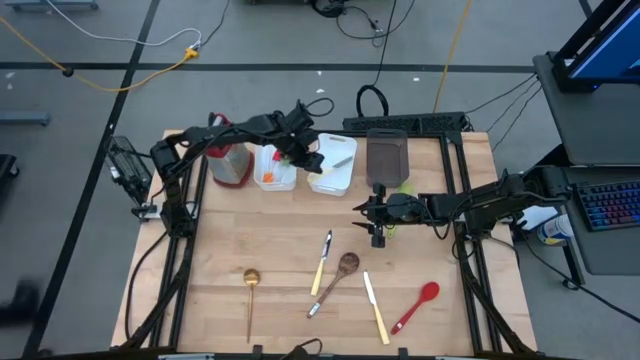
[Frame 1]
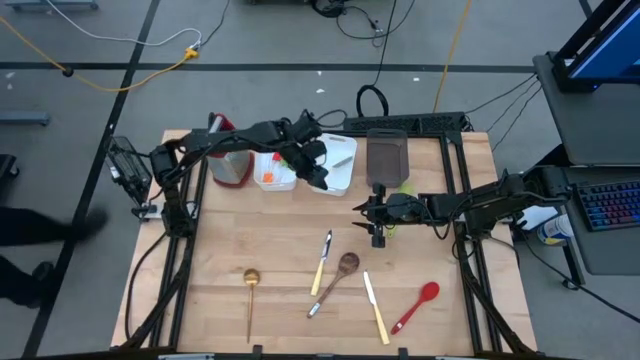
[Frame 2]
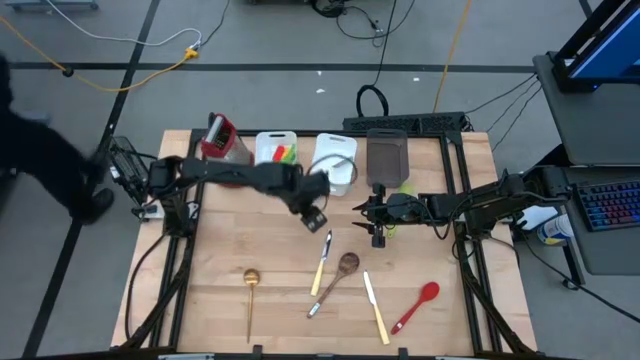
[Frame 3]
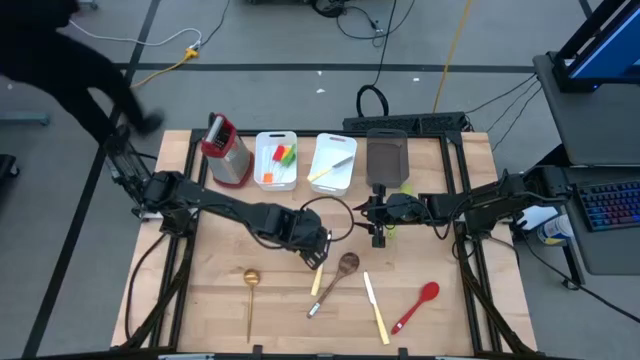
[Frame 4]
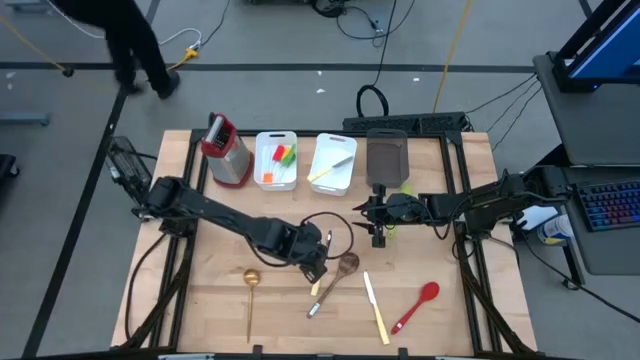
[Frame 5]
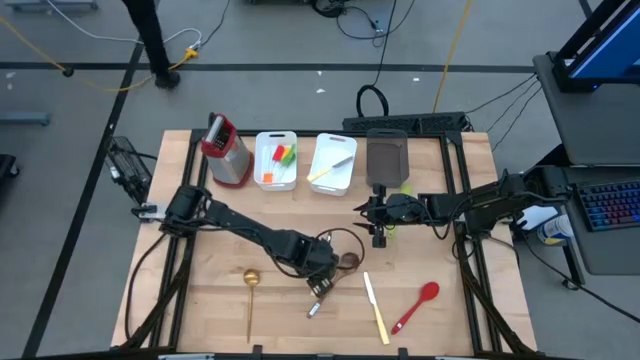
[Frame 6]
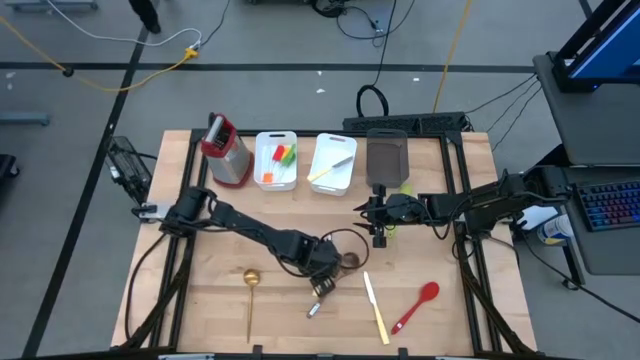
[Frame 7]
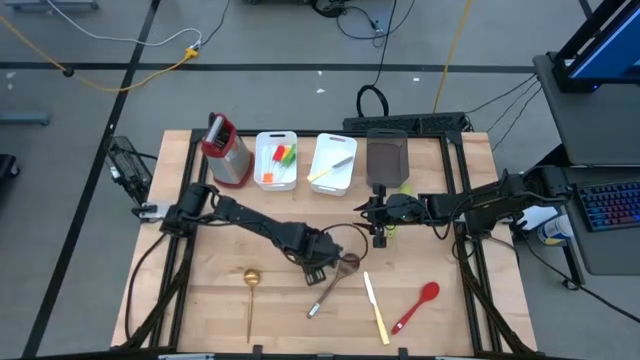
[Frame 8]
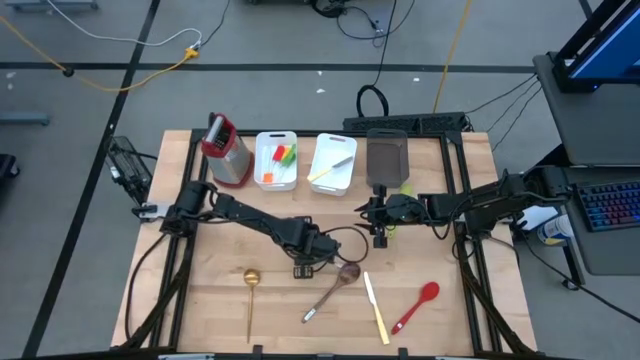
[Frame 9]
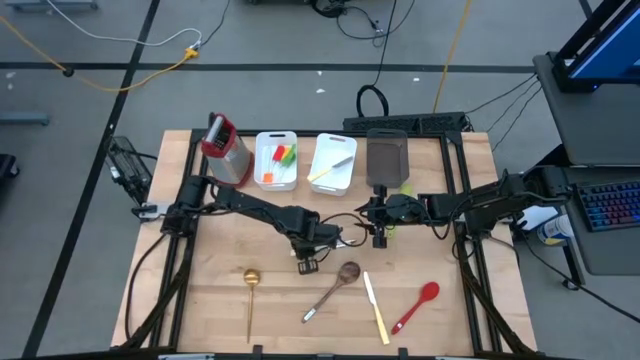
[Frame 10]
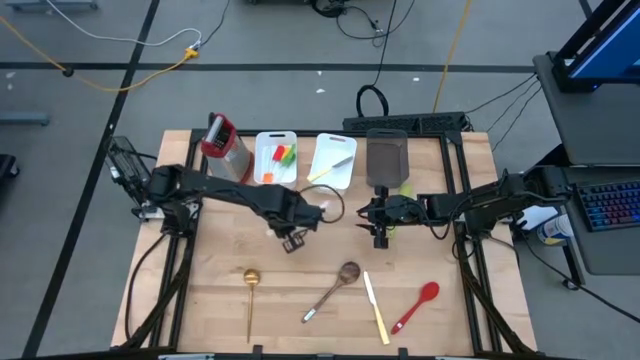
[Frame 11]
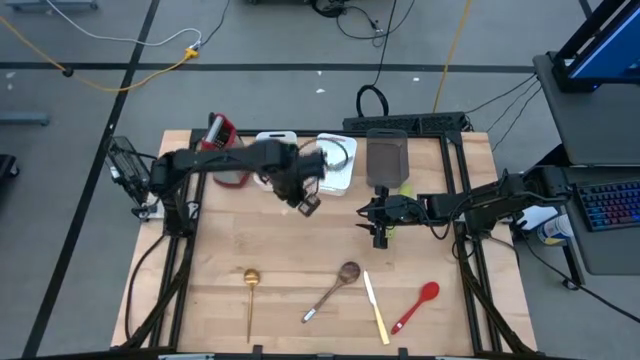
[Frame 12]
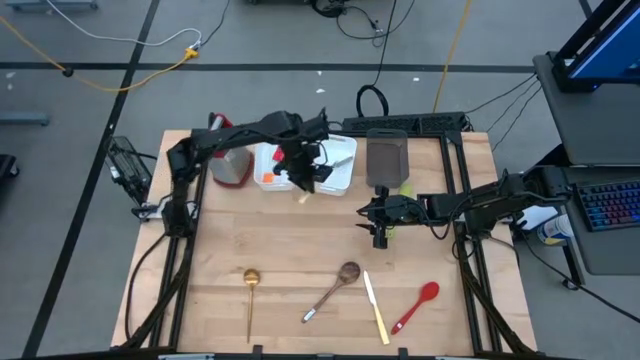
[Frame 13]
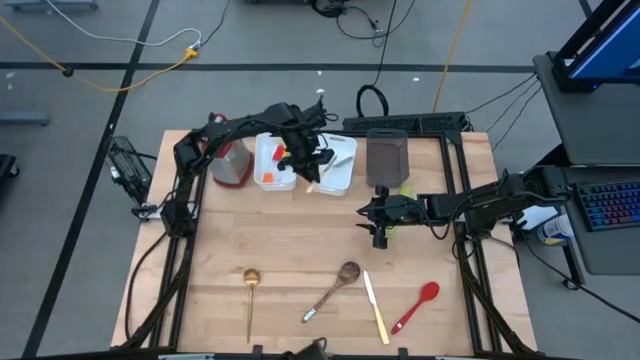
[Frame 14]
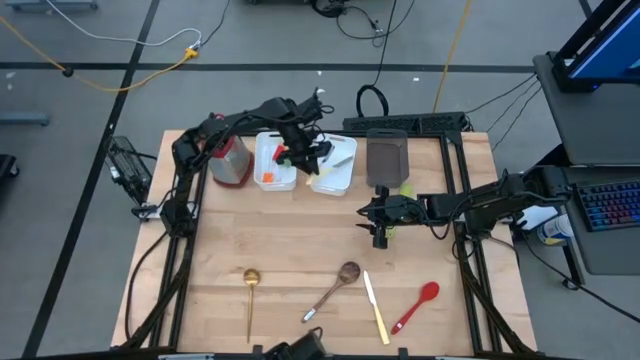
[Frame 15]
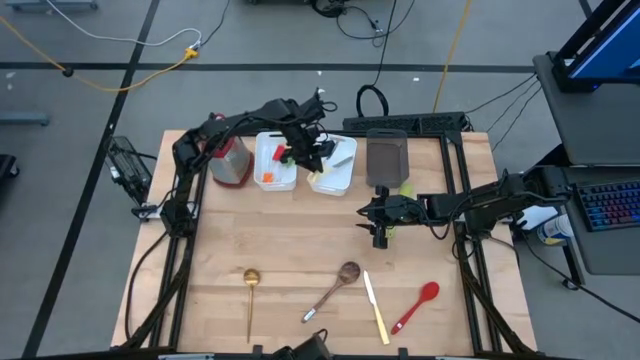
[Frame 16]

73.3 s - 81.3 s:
Task: Pick & Place Kitchen Items
Put the top yellow knife into the right white bin

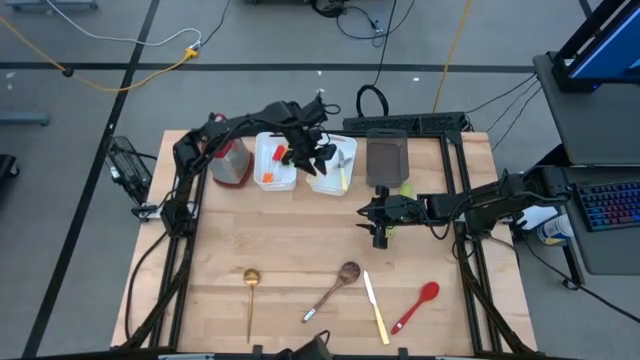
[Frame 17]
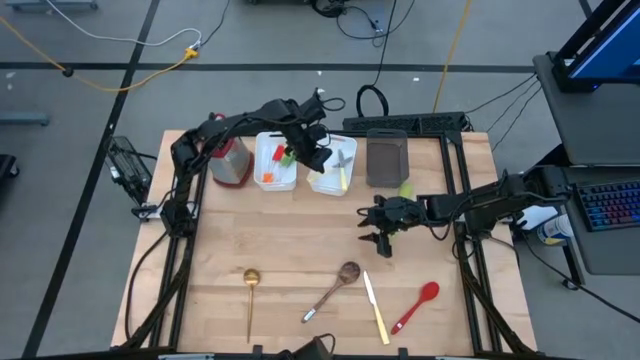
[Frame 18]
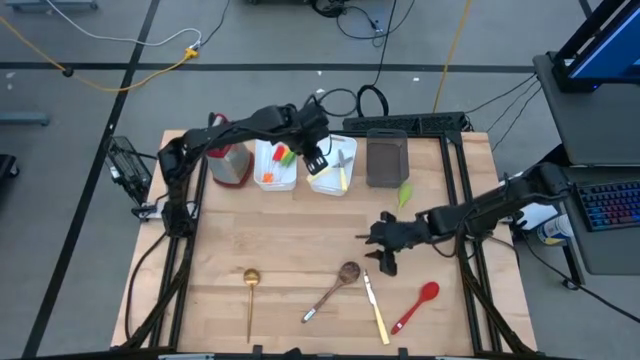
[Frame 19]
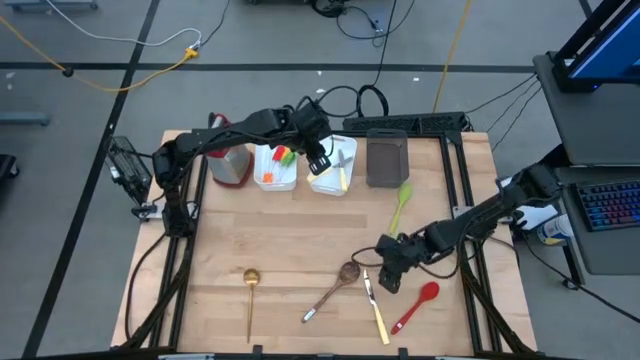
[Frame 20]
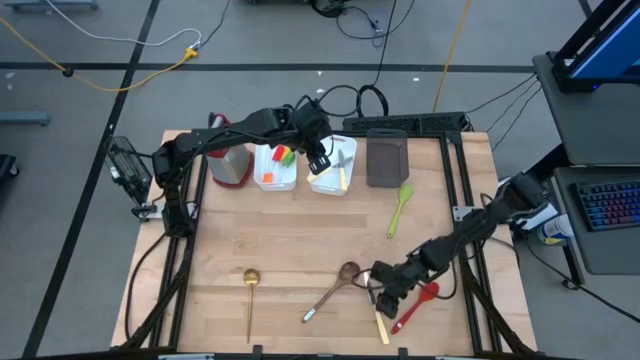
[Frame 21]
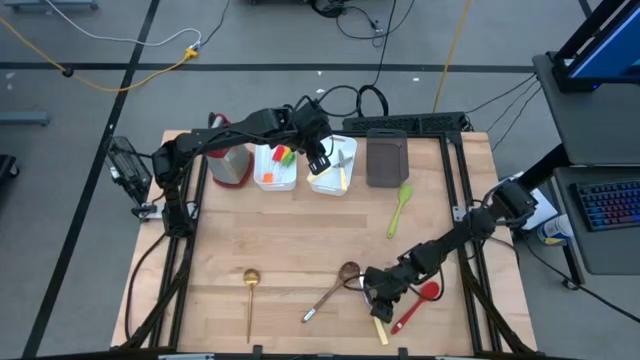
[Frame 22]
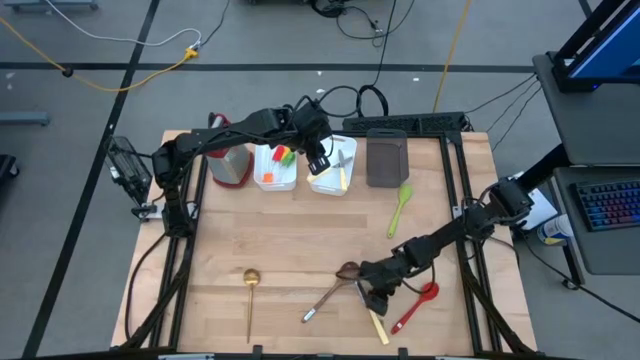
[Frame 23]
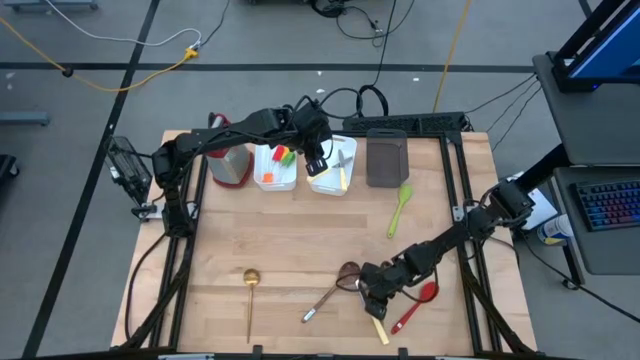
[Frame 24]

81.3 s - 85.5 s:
Put the yellow knife into the right white bin

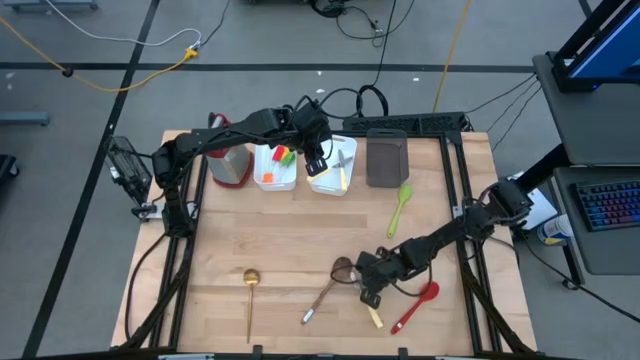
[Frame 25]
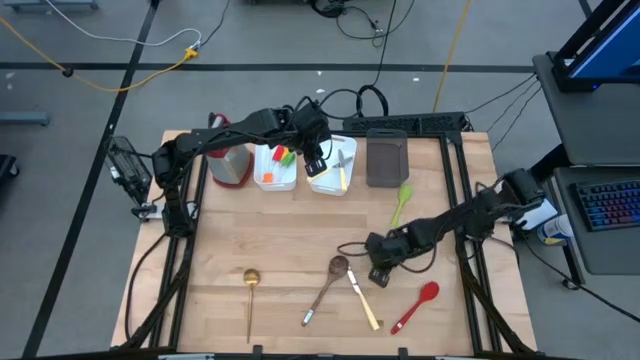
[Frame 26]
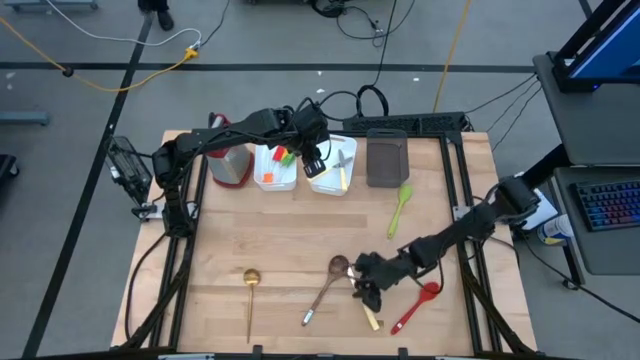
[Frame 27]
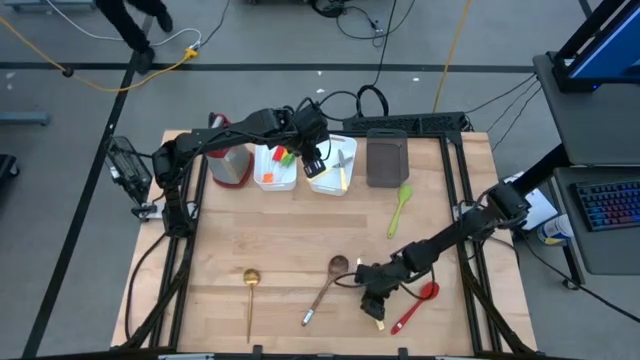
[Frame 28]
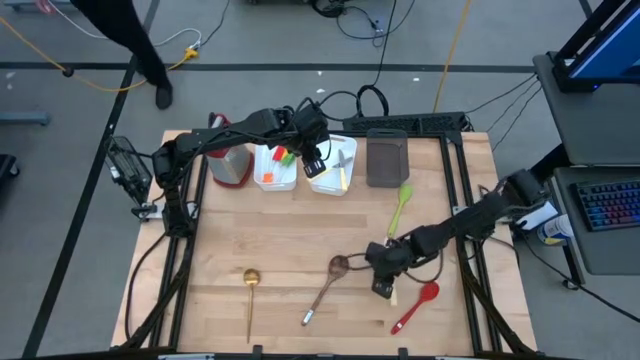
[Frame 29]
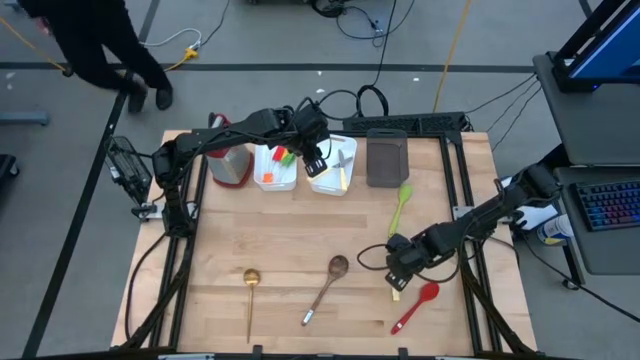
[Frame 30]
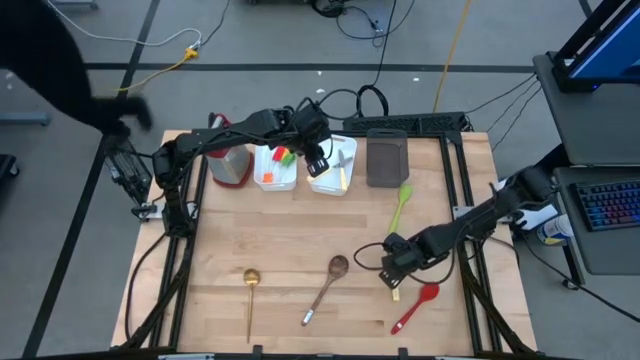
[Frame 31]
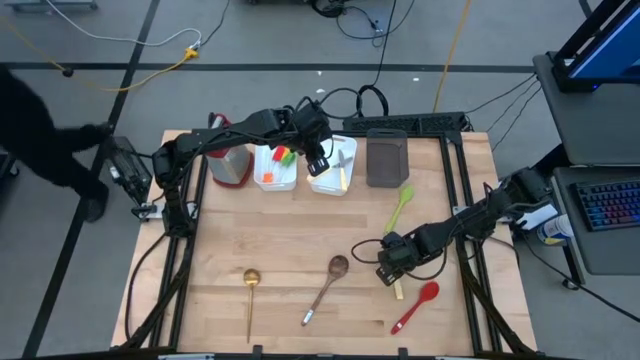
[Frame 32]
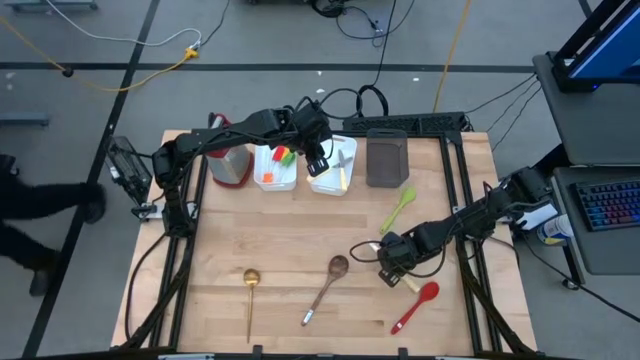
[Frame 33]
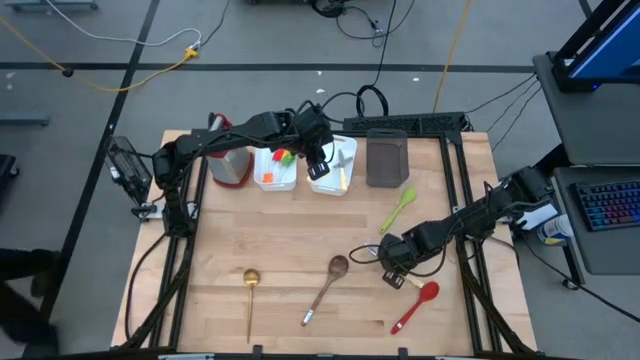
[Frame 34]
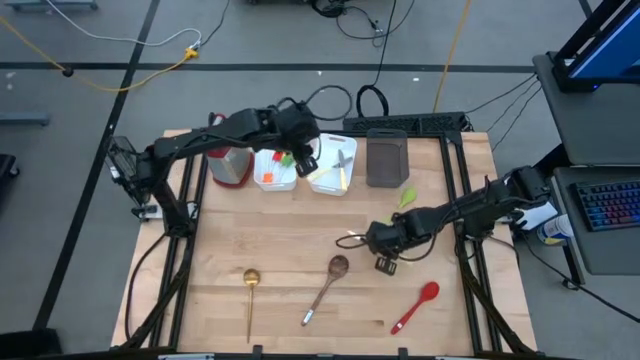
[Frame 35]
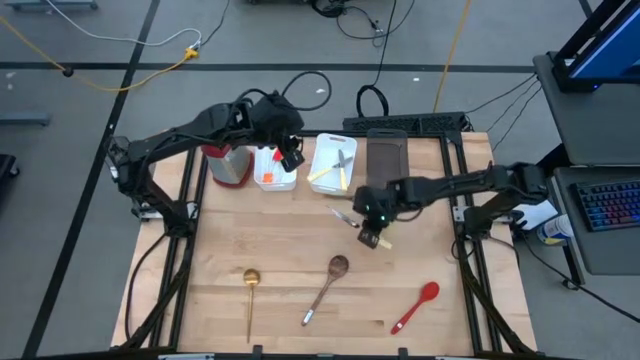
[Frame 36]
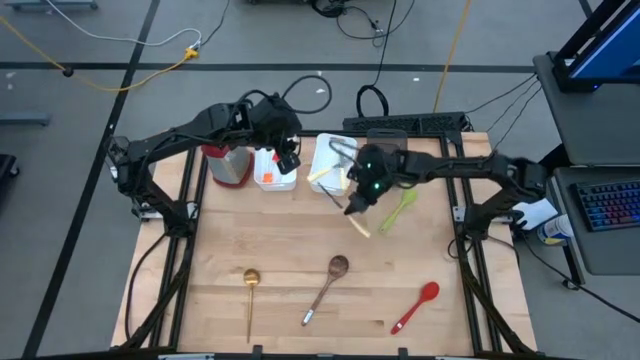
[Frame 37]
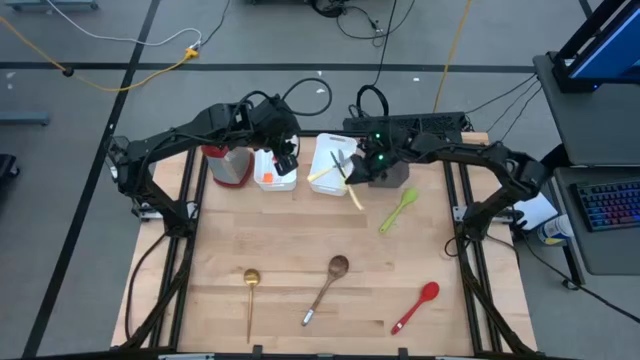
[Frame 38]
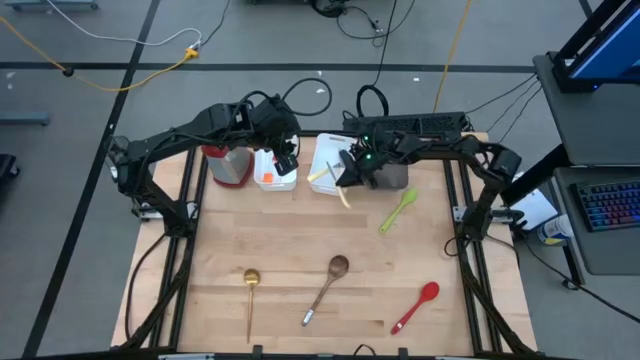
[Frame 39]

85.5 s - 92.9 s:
Put the yellow knife into the right white bin

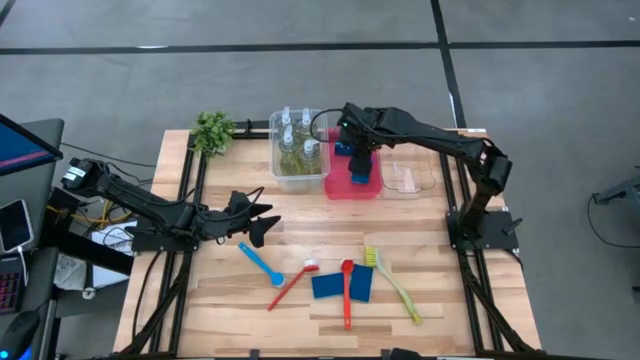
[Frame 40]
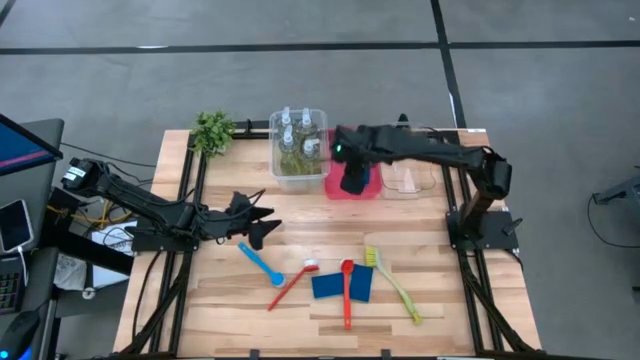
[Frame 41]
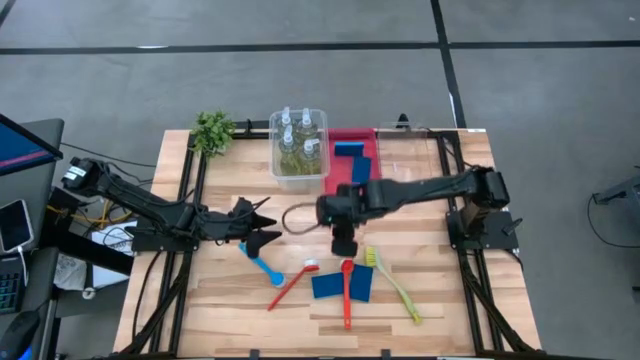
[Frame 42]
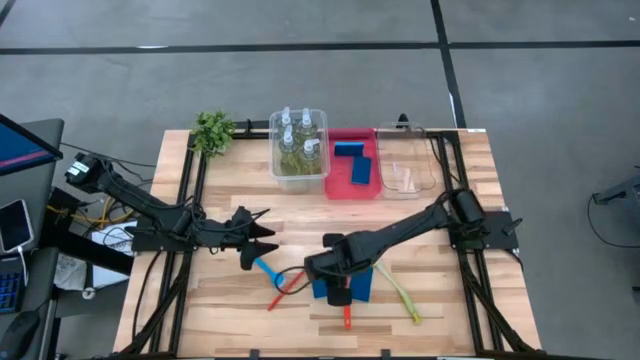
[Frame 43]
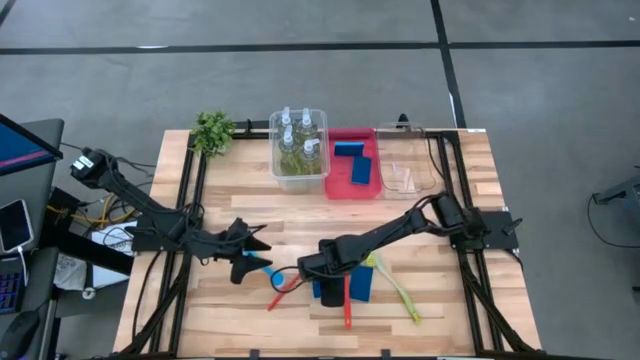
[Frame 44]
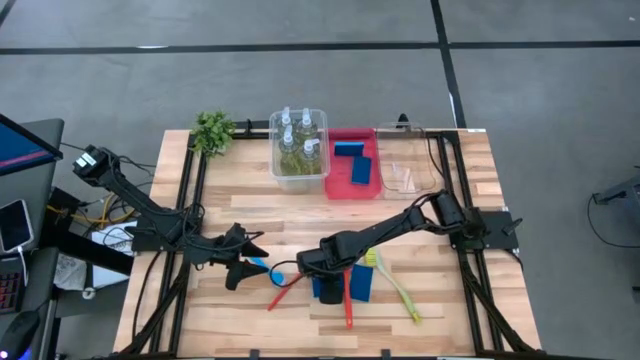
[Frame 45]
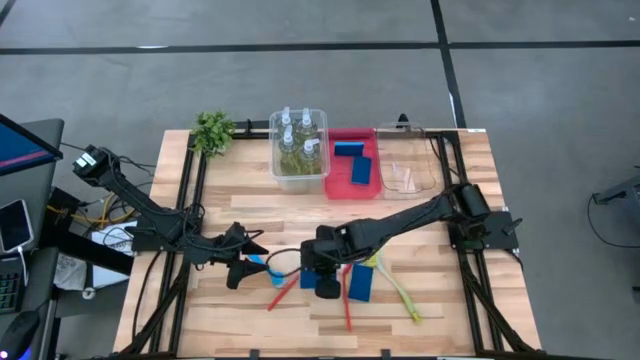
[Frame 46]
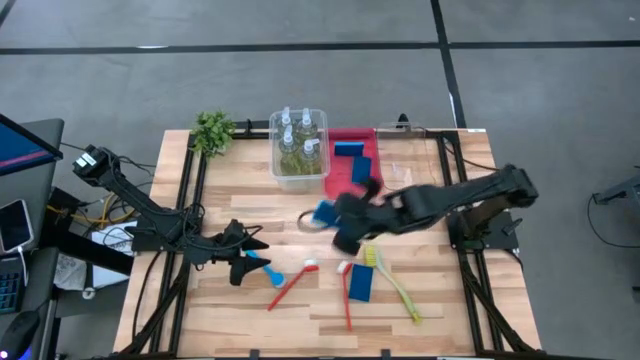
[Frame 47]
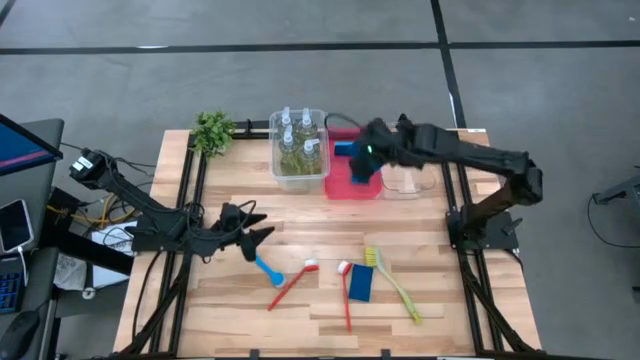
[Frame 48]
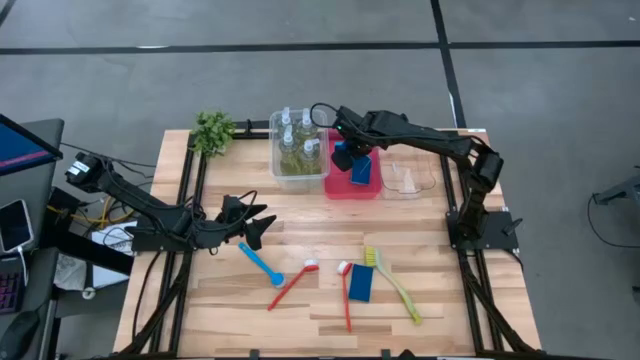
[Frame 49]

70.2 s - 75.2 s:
Task: Pick & Place Kitchen Sink Supplies
Put the blue sponge into the red bin
